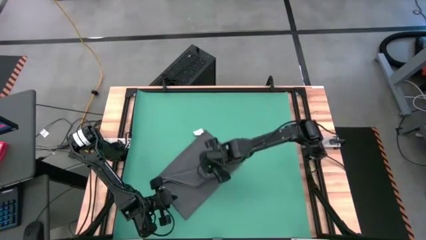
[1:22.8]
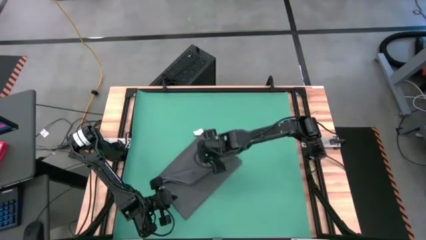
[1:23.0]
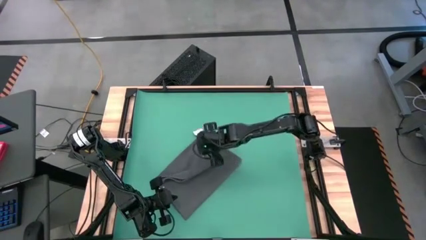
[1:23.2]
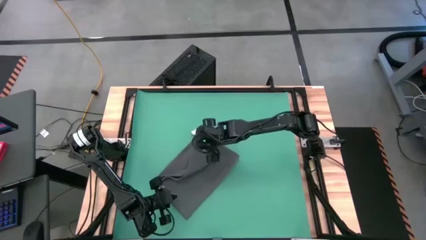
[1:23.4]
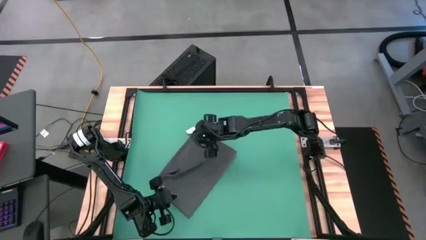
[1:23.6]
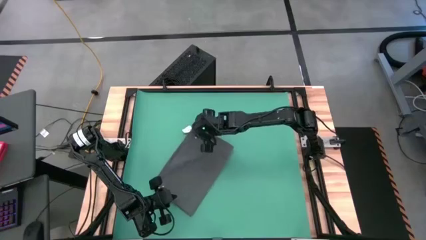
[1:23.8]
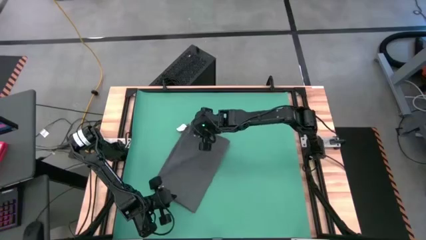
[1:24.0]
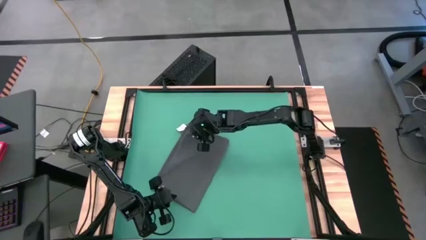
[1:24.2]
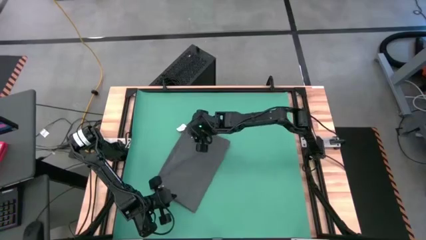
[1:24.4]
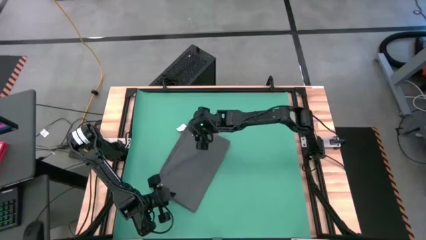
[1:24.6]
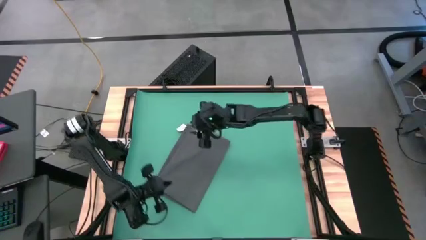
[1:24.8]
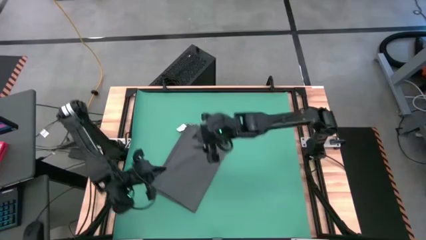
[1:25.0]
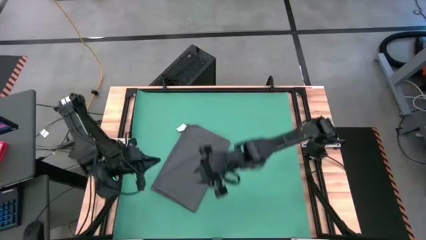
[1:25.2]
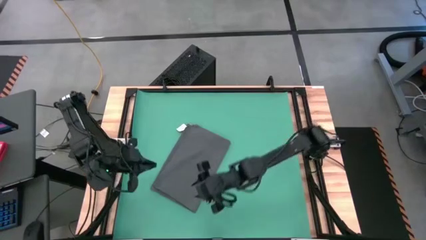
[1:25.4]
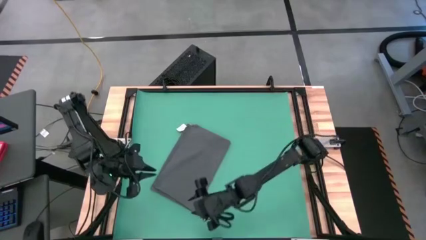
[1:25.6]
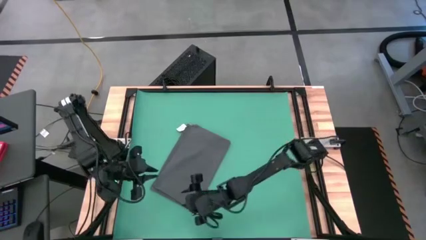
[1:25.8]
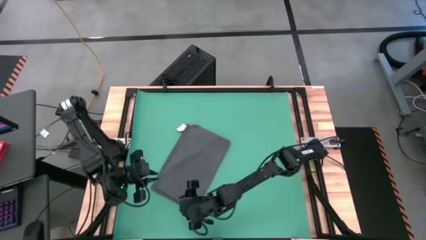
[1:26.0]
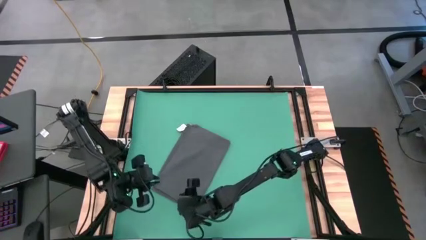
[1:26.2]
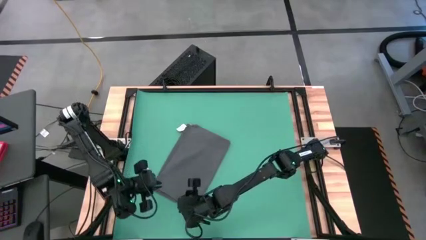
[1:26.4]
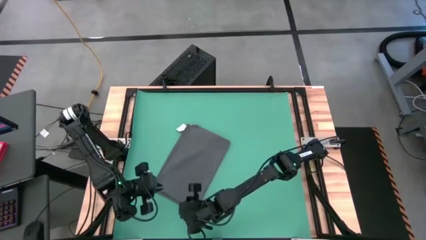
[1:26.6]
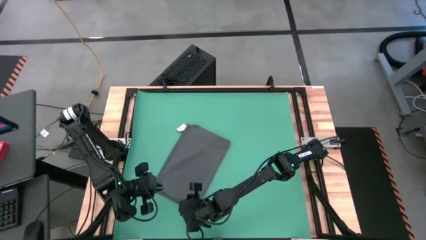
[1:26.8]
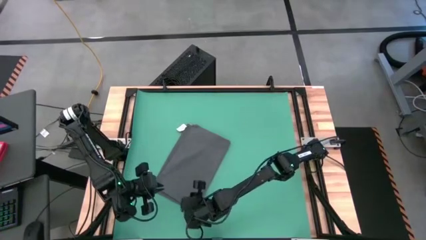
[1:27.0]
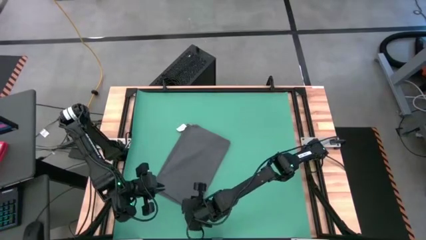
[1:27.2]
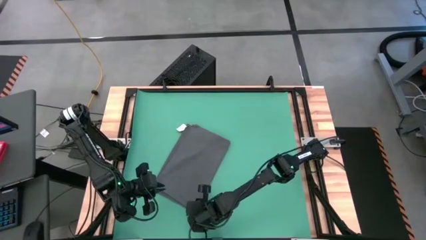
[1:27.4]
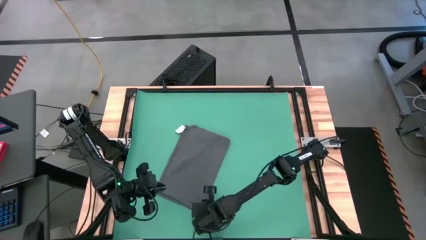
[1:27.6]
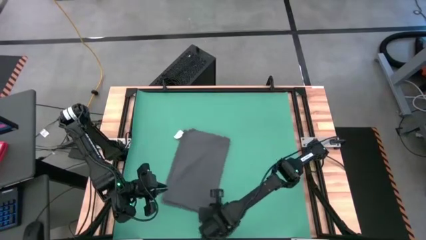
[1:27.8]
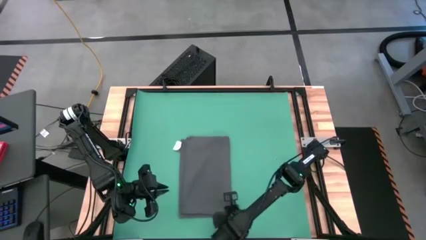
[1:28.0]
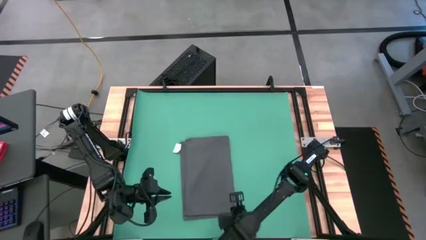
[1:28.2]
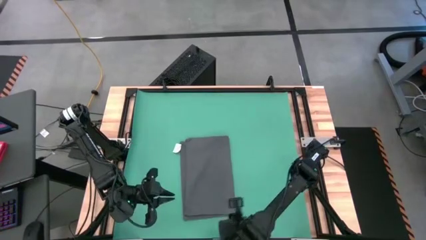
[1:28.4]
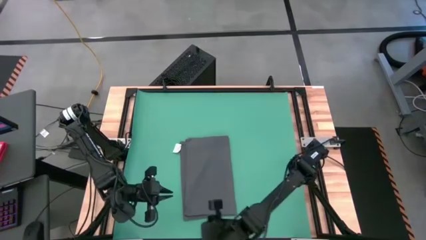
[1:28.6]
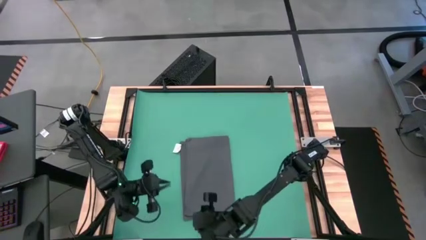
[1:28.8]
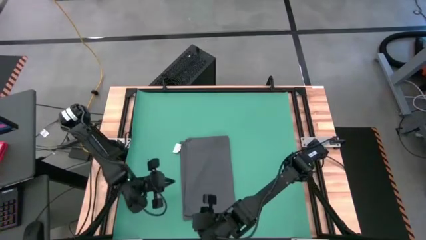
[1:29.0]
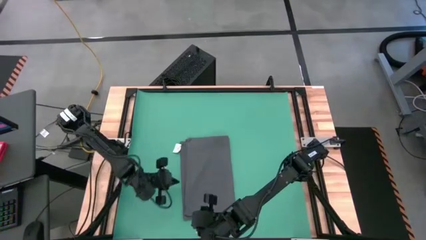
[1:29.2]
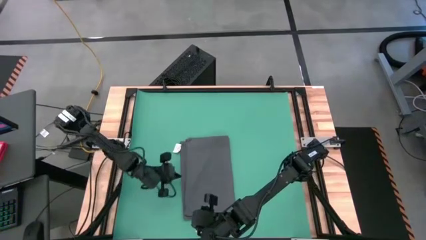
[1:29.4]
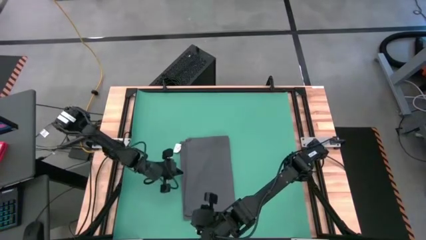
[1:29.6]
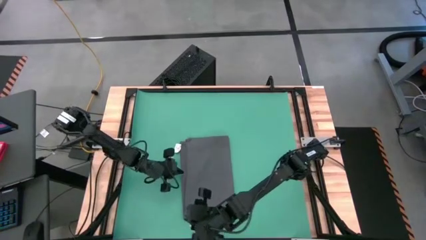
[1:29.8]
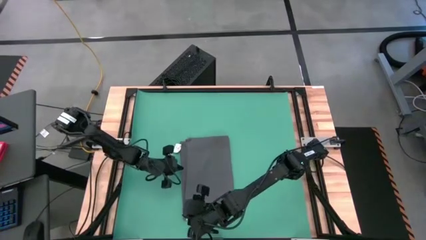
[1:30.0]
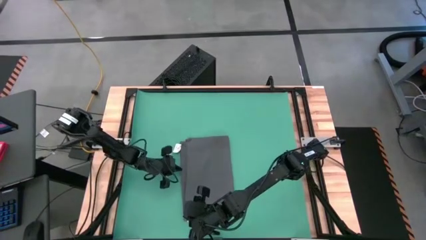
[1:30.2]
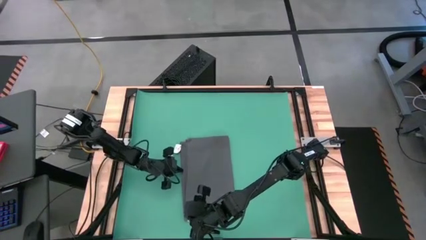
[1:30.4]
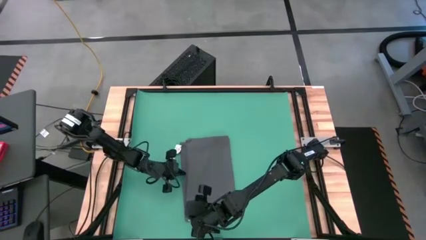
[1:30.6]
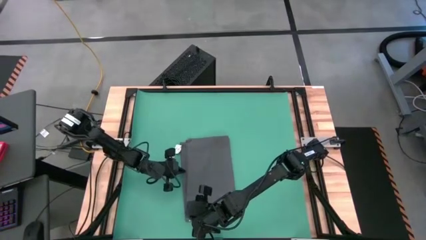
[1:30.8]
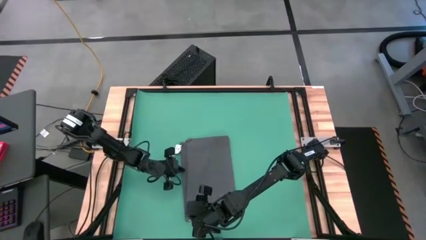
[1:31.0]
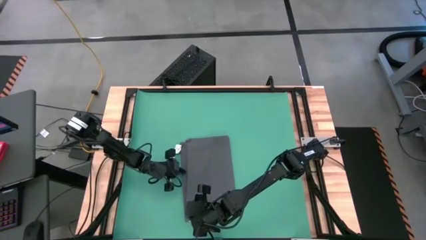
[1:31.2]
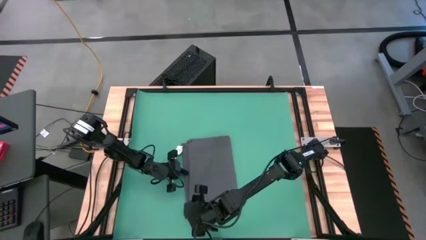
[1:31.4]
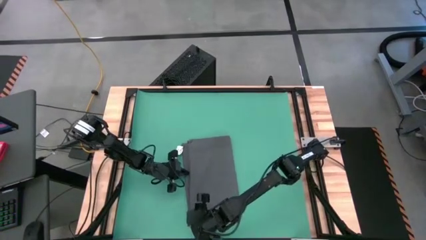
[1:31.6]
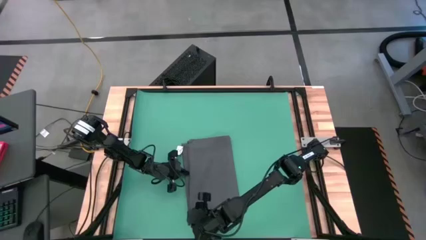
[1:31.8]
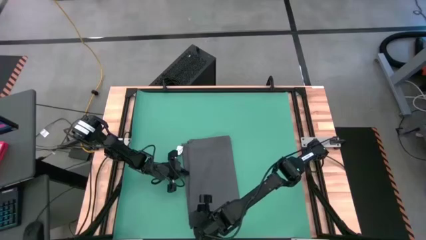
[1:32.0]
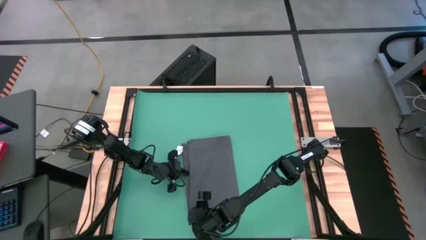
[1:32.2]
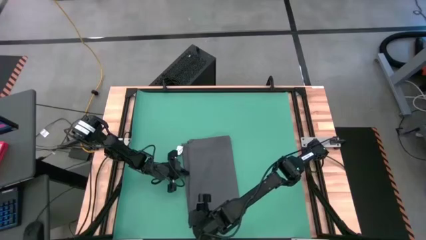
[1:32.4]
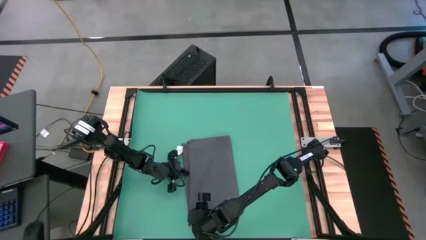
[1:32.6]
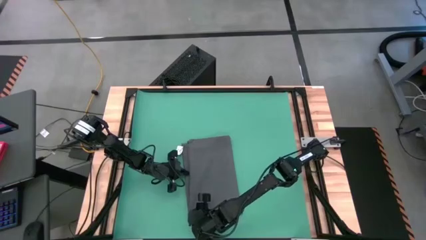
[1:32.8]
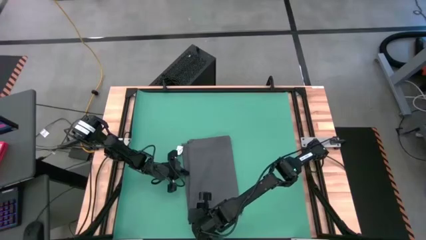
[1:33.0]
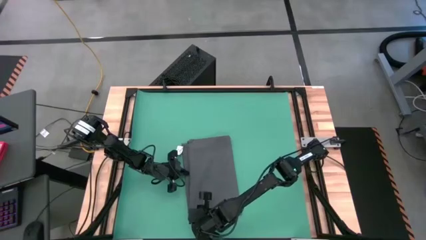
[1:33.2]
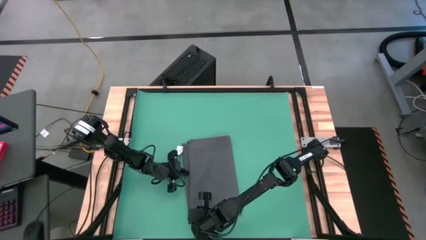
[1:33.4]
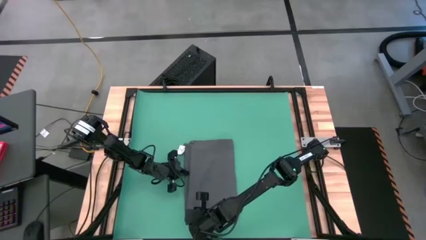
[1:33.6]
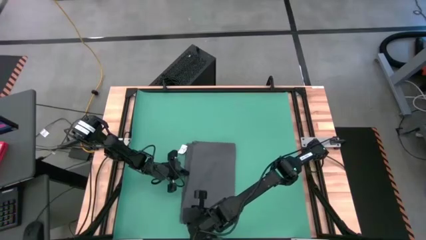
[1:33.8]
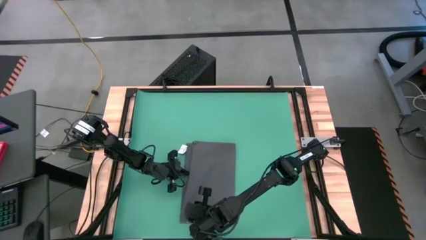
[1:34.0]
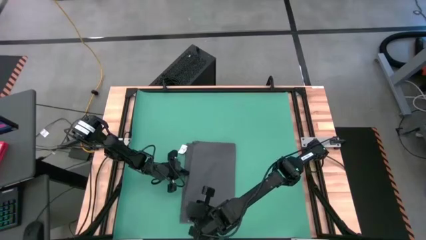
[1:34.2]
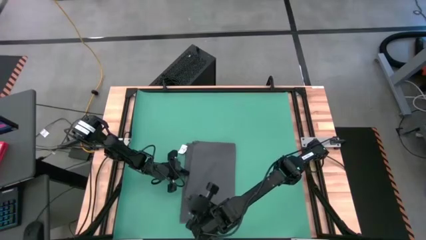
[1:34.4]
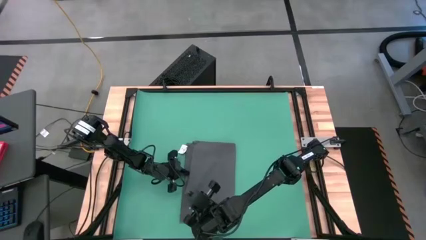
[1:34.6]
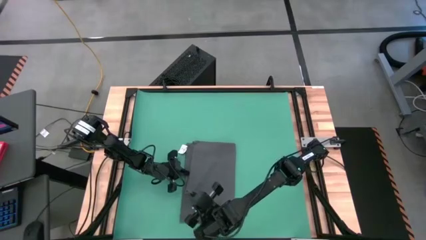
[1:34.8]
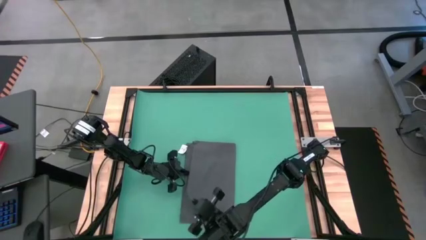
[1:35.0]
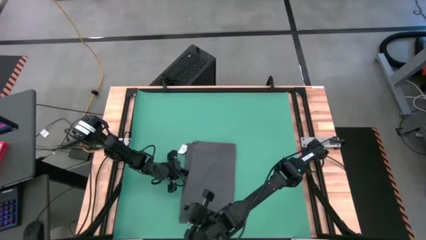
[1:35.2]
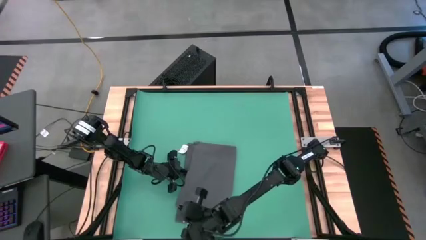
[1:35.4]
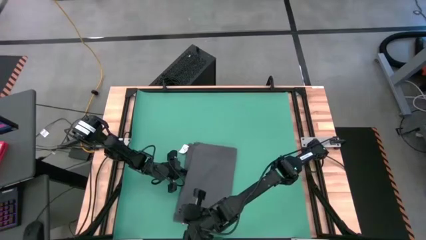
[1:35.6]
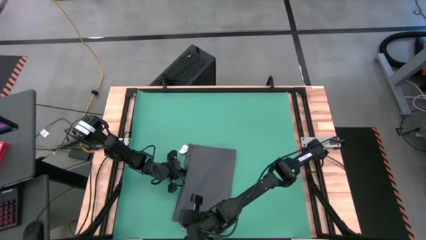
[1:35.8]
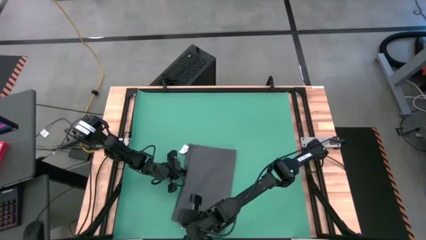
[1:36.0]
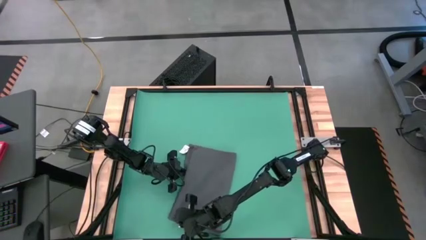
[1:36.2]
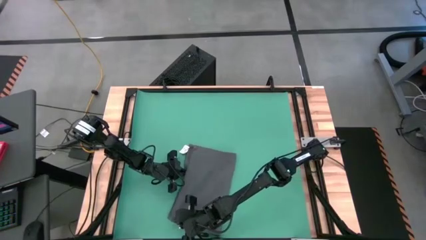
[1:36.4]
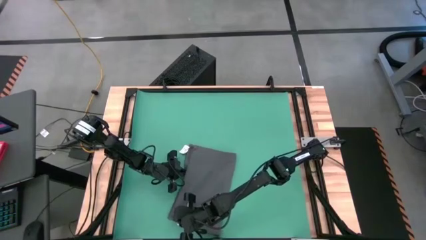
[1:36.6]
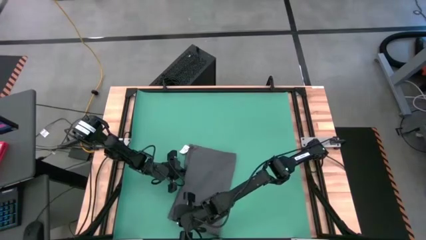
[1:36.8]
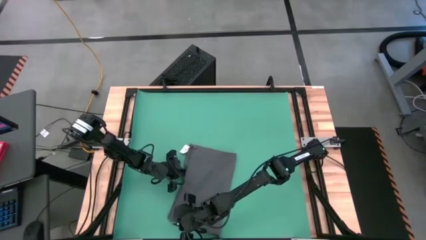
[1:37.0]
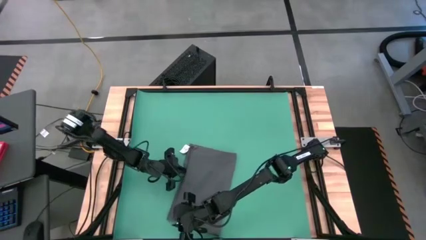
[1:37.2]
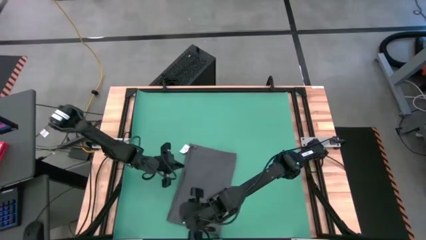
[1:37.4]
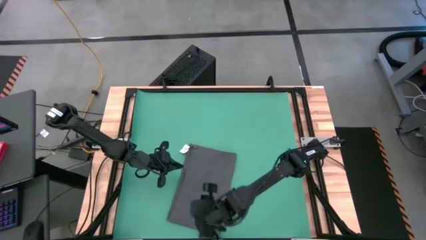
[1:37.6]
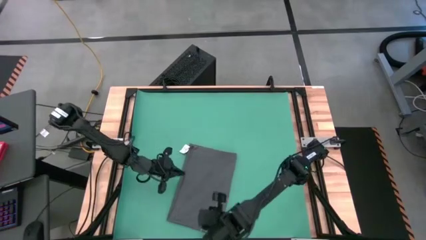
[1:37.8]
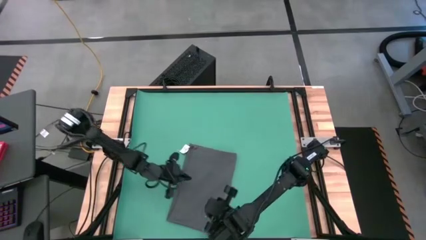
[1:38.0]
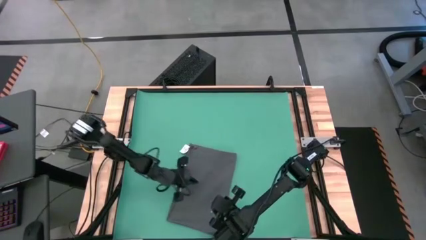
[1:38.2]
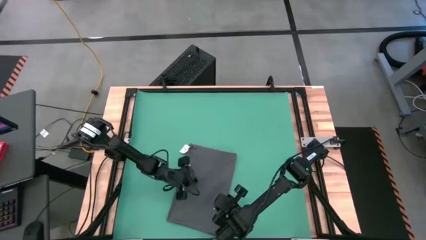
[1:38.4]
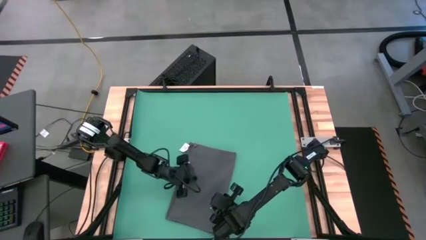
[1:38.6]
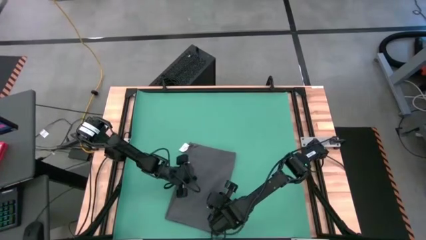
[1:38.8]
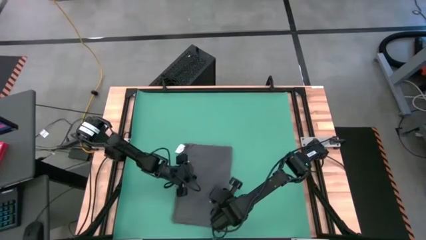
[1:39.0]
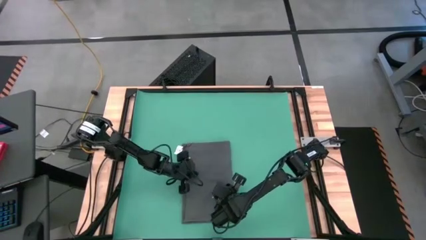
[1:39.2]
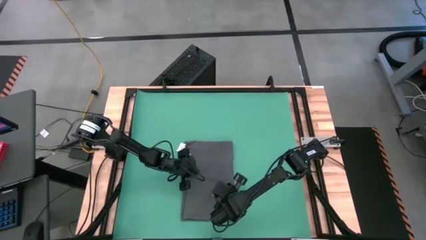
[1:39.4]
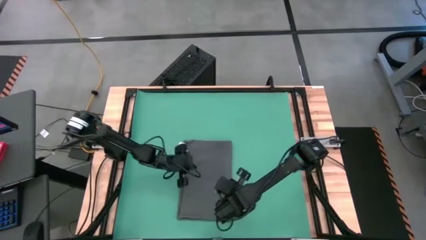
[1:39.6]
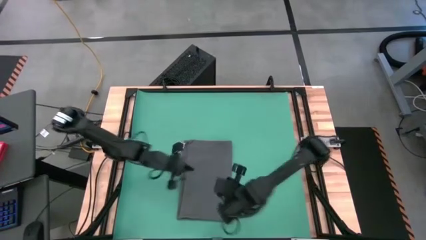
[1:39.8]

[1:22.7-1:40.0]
Task: Roll towel
Roll the gray towel on the table
